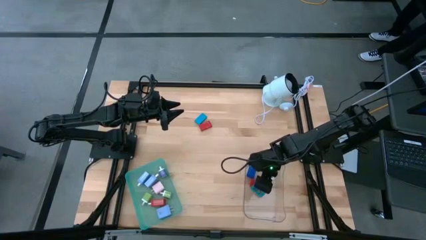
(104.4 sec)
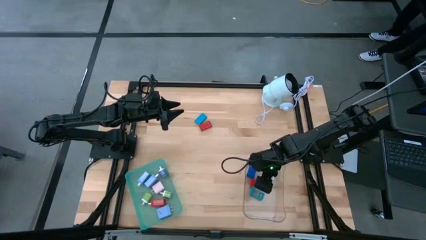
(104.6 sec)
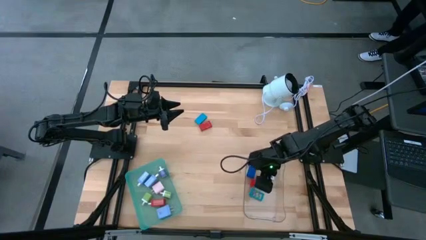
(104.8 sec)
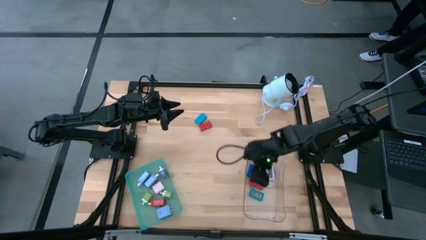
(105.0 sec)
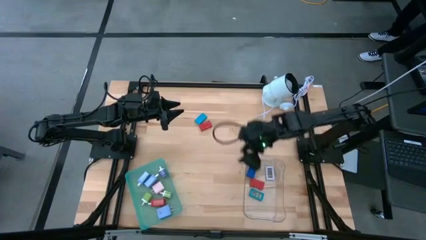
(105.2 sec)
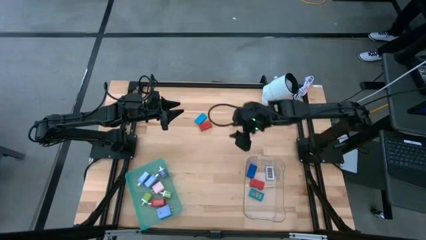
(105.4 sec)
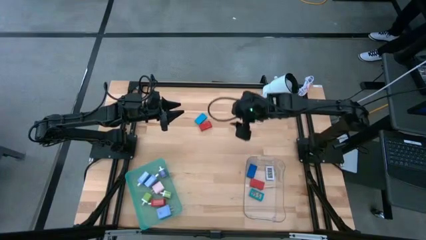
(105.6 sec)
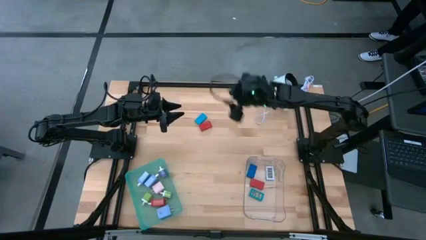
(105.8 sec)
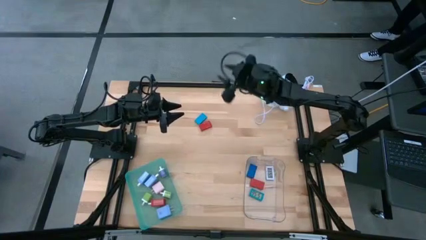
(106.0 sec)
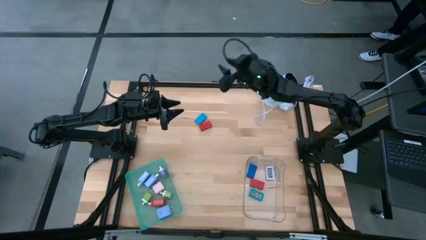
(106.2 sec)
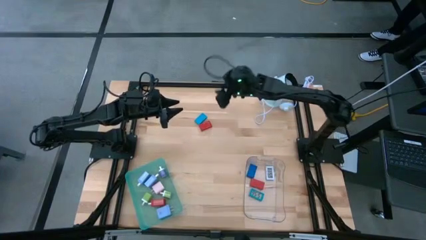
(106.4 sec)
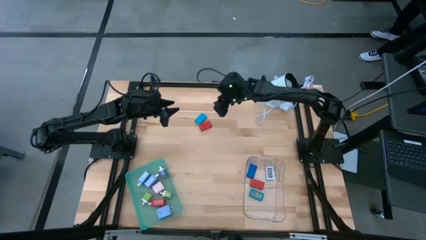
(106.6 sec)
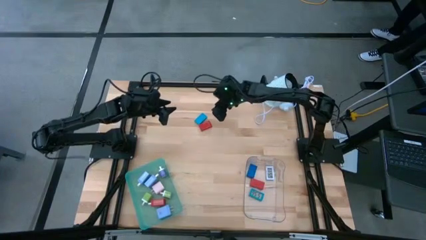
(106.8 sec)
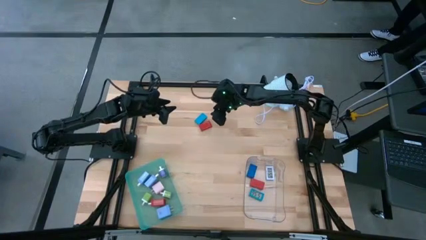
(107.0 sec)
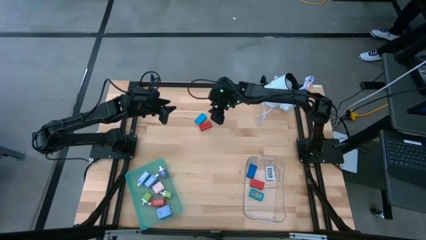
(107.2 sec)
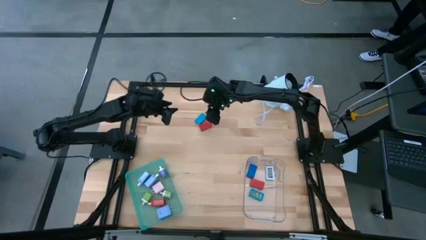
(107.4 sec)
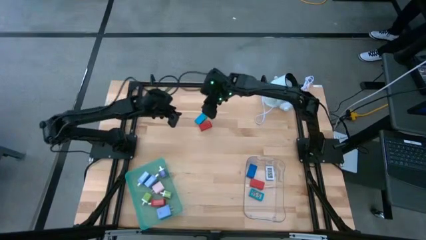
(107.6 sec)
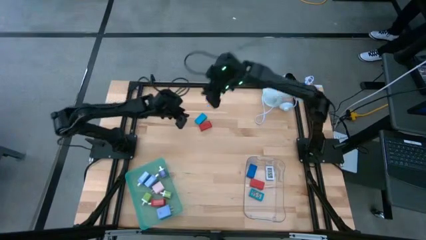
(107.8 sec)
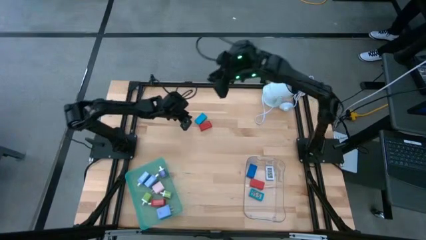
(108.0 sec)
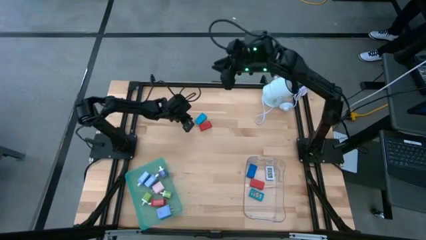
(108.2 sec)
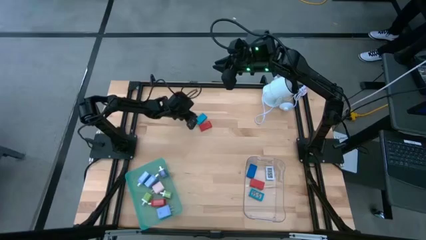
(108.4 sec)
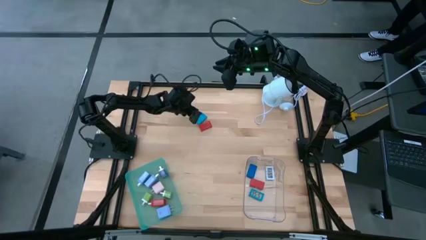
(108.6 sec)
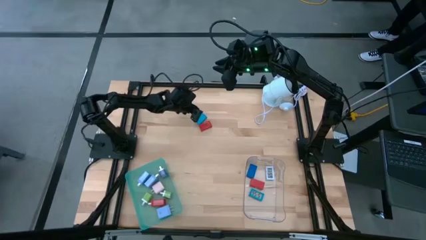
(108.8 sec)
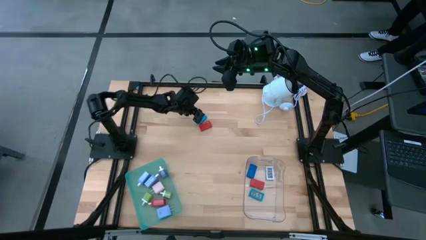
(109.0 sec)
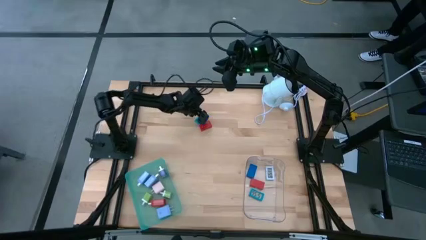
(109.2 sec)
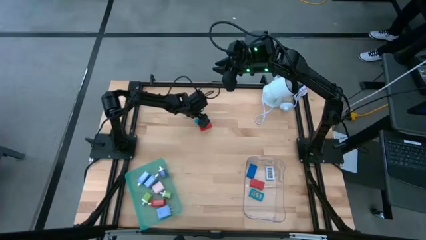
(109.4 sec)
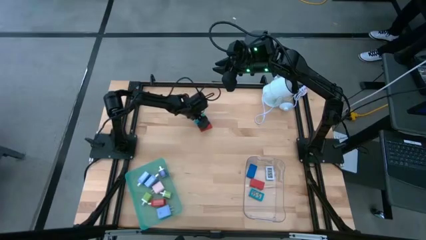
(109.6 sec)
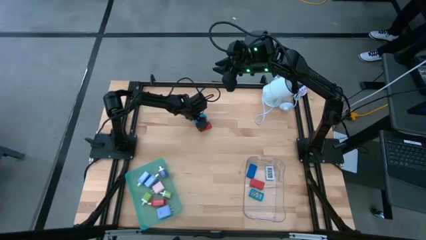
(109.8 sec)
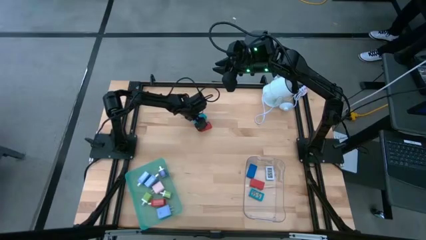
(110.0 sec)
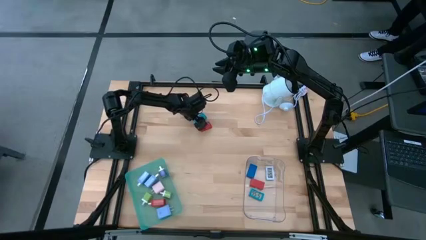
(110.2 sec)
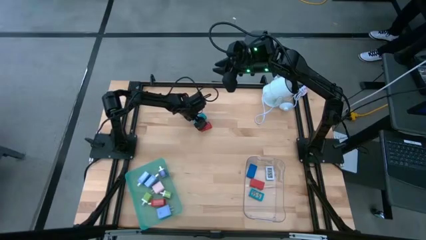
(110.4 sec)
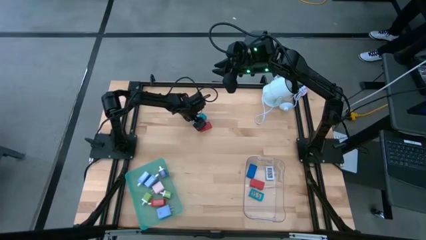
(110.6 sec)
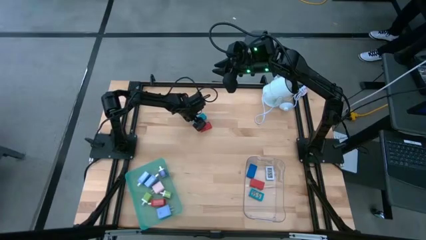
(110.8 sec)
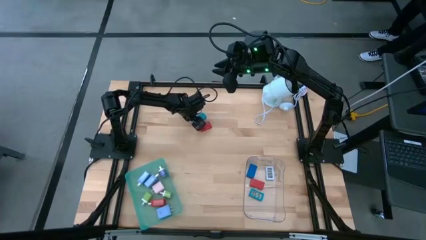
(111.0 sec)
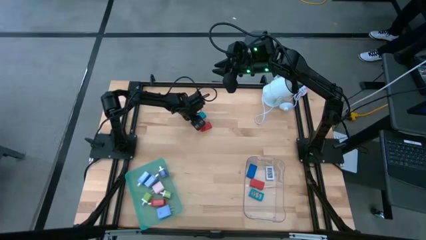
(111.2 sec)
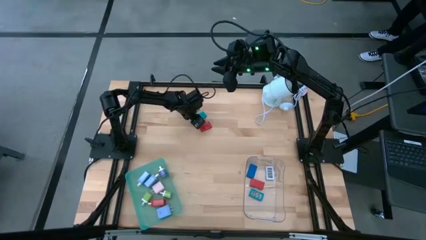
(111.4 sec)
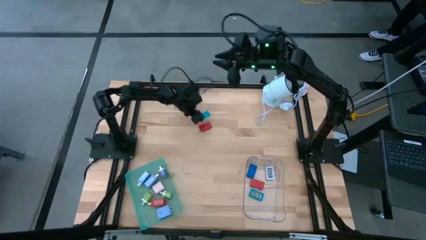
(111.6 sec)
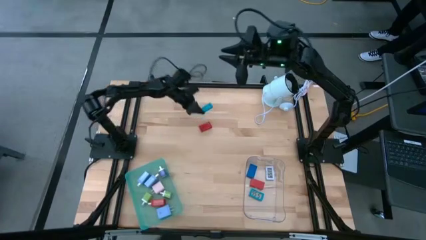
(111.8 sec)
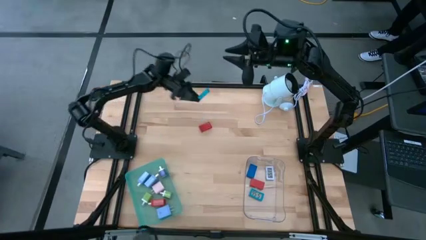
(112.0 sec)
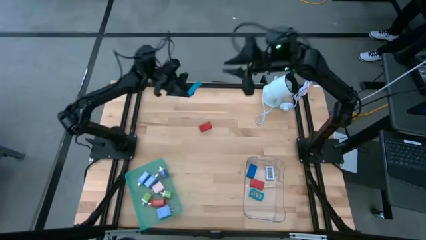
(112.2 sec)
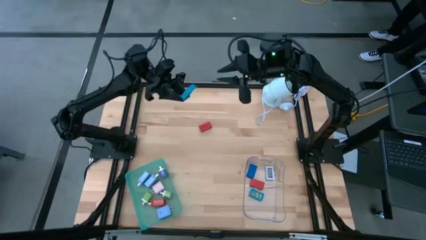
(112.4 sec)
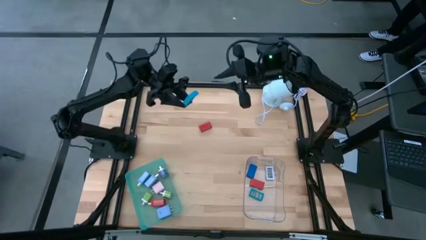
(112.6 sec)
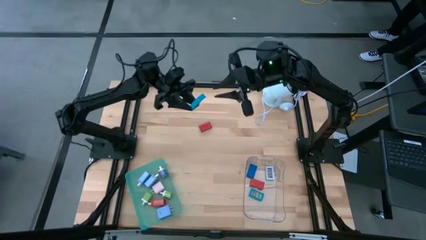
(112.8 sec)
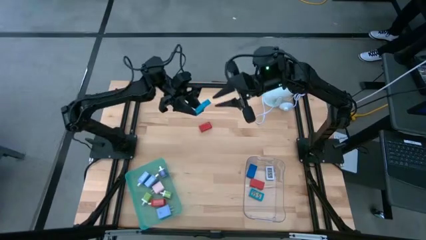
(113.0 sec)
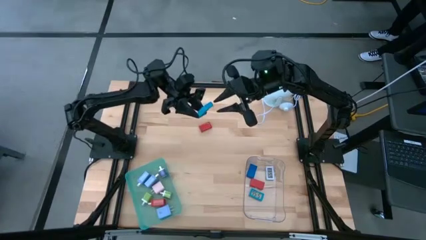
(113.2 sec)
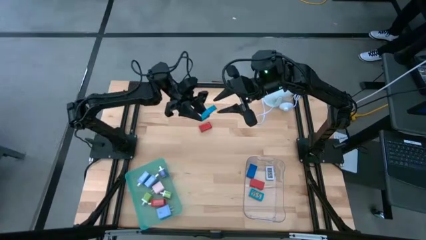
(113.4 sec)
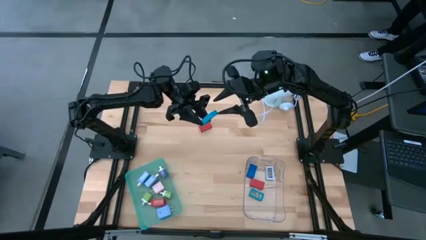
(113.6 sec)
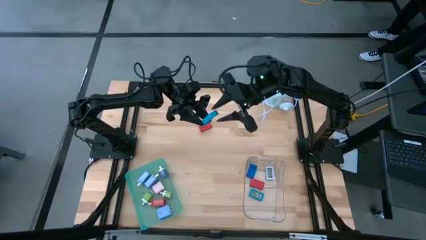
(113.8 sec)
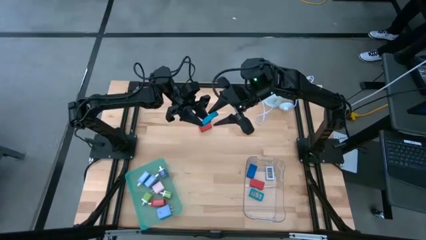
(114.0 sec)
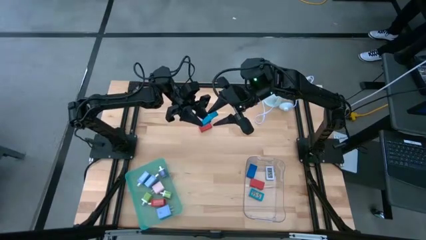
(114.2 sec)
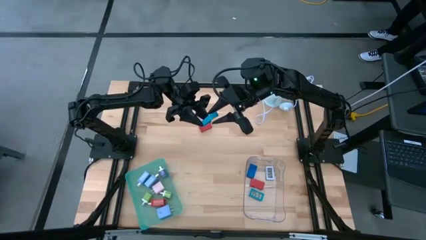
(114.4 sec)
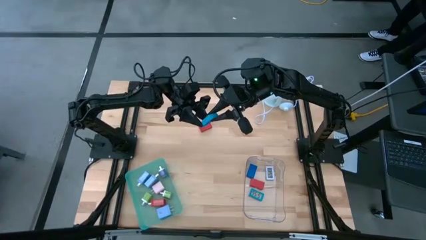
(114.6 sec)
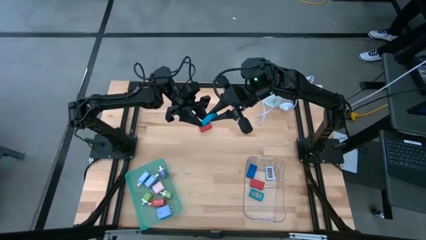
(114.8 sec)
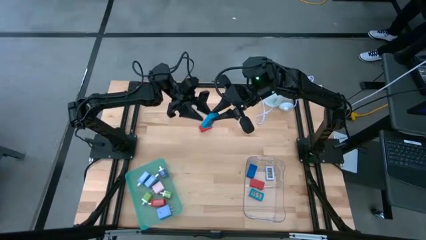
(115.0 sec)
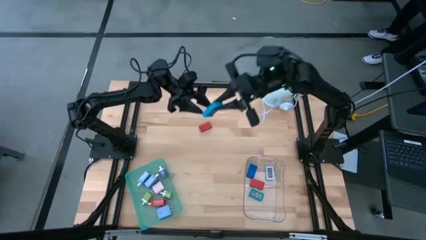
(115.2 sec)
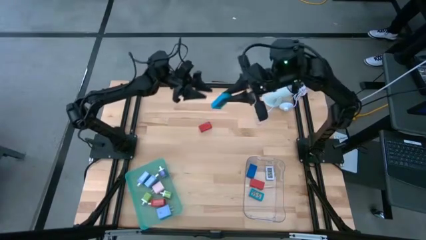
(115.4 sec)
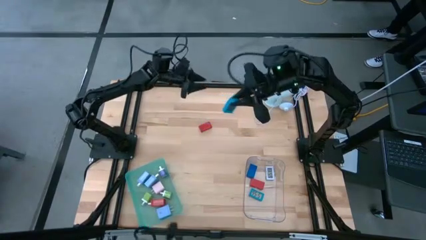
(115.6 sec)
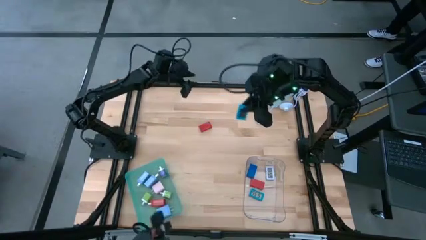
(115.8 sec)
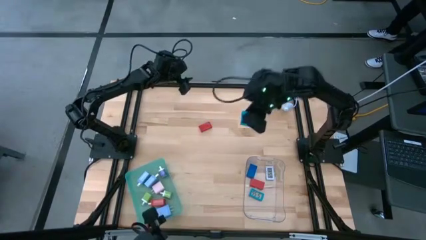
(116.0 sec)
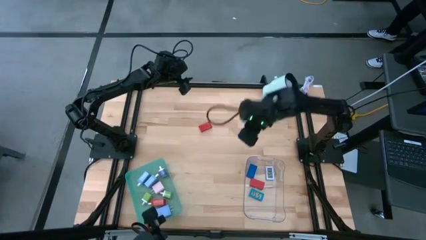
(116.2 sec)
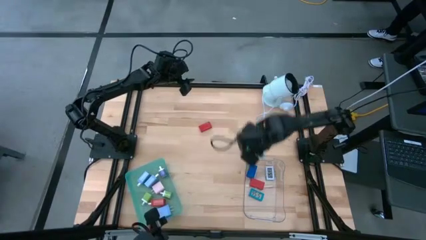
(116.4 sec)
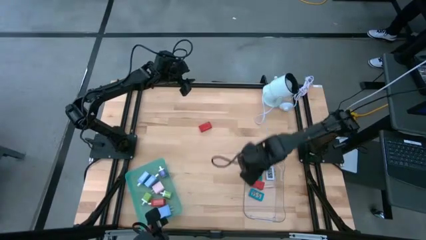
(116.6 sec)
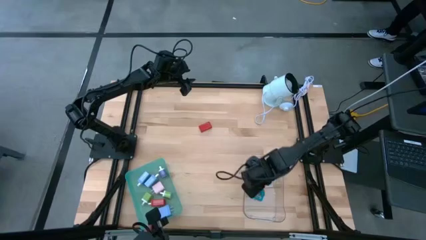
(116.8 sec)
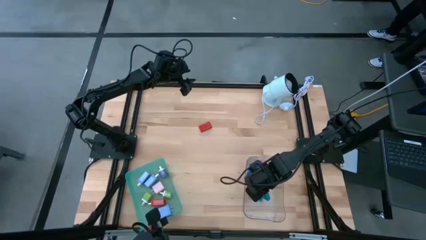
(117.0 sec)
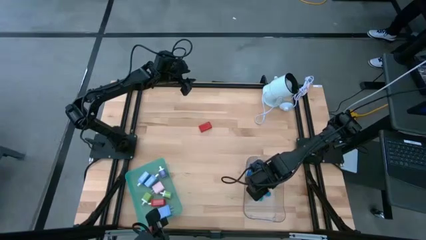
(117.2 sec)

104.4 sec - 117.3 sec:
Task: Pick & Place Office items
Put the light blue digital clock into the transparent bin

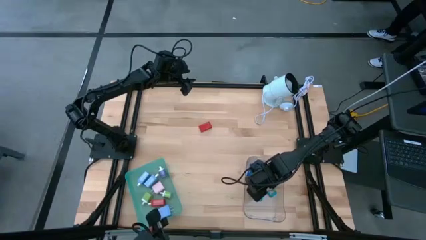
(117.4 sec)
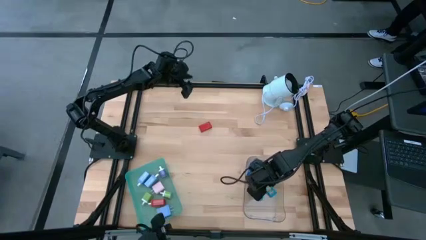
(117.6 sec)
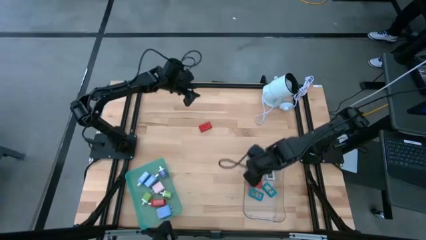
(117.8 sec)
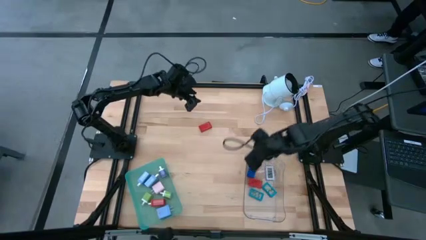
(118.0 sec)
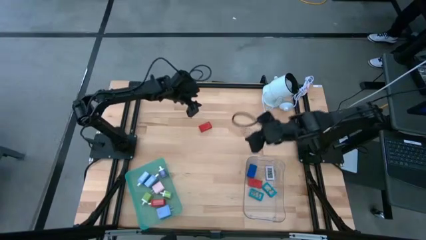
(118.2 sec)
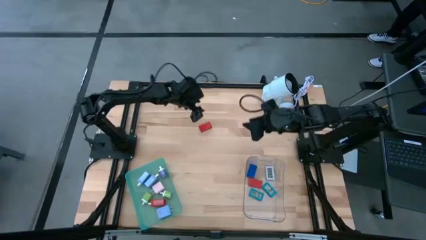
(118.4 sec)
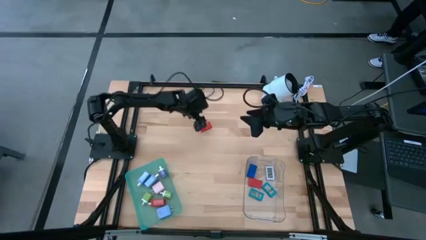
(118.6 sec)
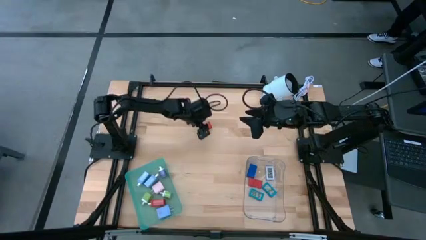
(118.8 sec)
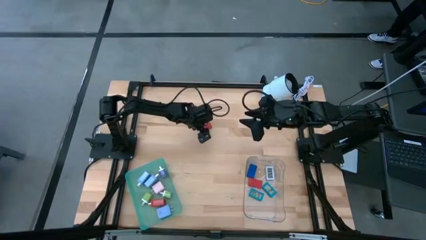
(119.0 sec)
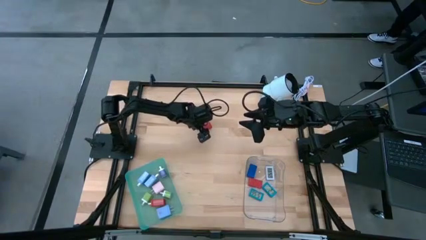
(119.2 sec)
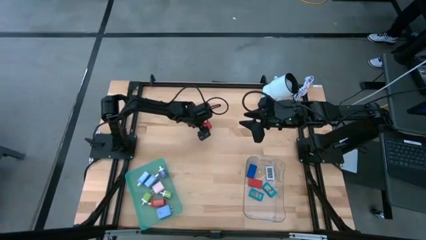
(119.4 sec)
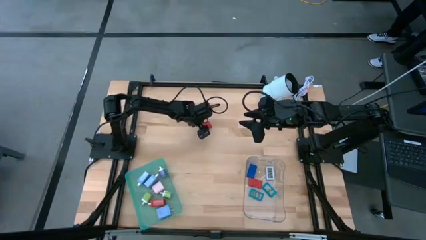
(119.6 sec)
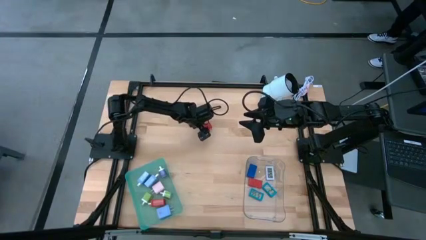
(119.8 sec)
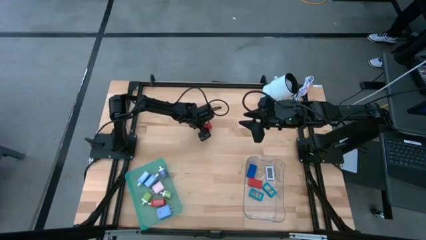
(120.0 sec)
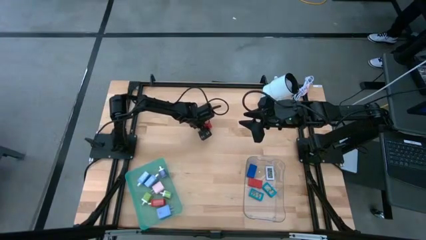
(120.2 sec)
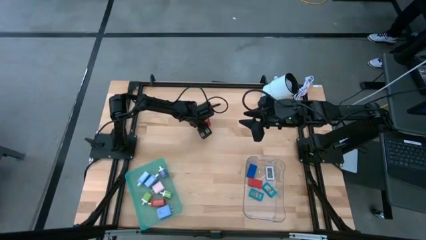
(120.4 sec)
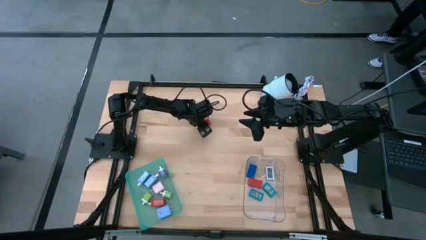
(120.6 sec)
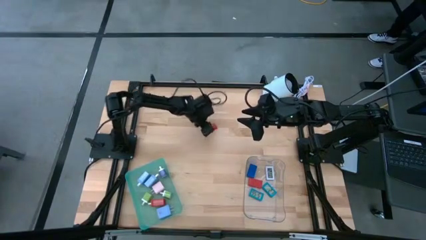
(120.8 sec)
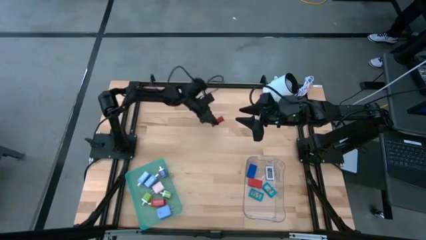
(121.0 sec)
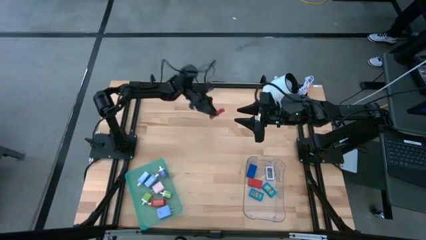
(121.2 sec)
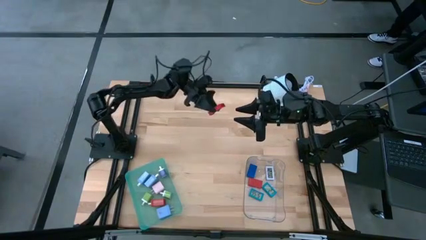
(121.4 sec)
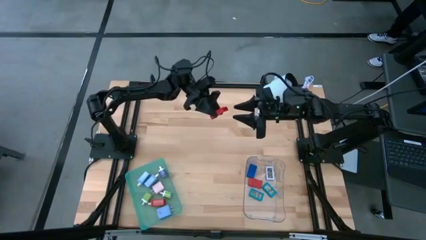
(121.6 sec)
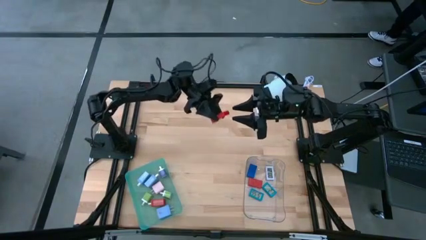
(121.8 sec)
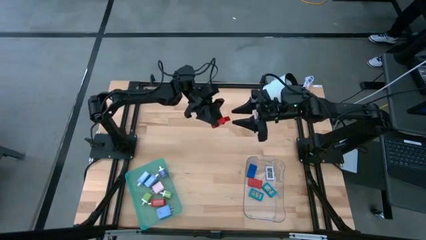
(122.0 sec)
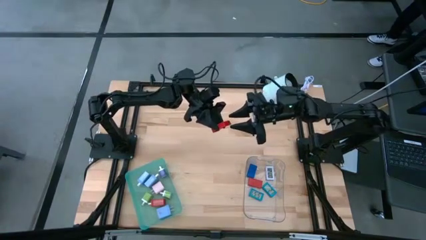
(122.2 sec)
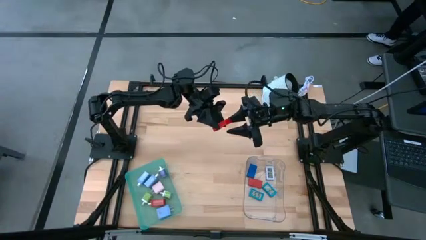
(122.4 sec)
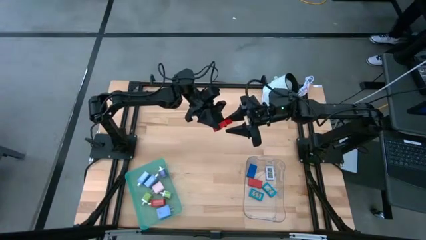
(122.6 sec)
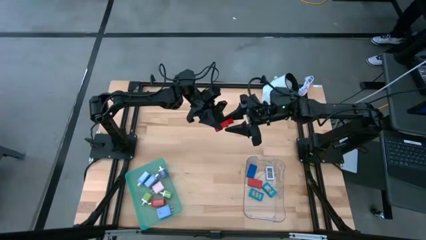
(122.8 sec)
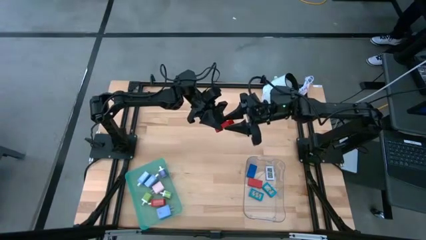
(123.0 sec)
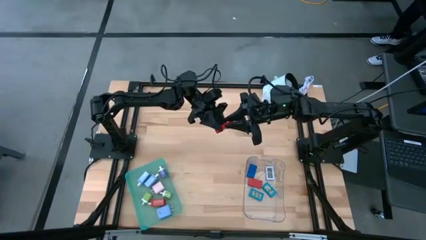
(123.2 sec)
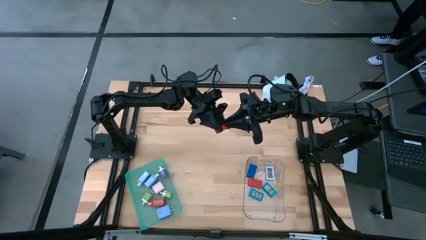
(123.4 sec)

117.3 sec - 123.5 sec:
Put the red digital clock into the transparent bin
